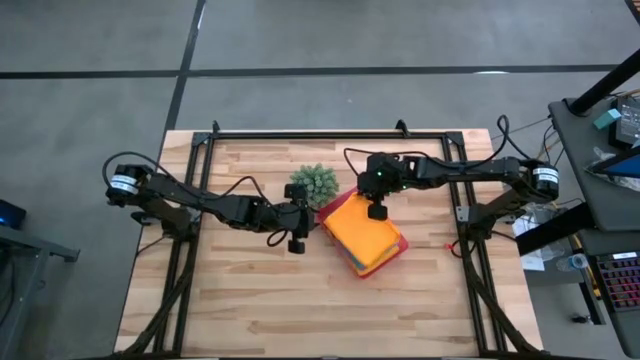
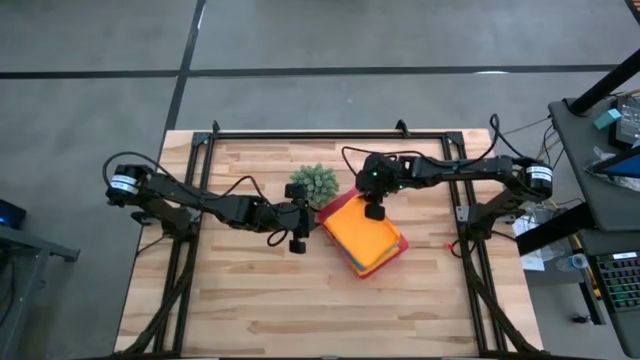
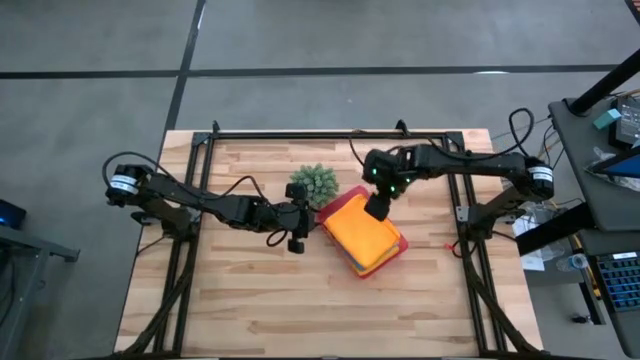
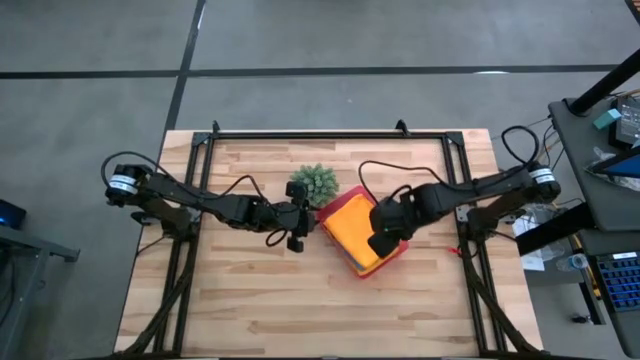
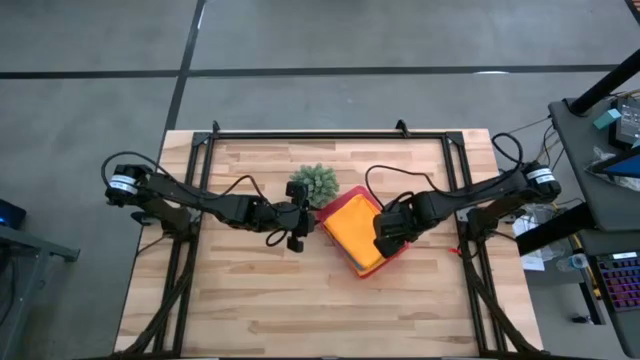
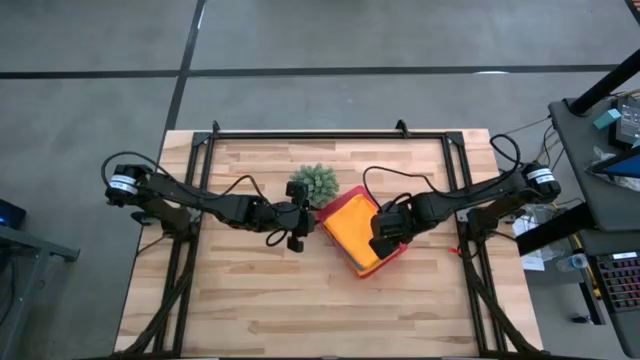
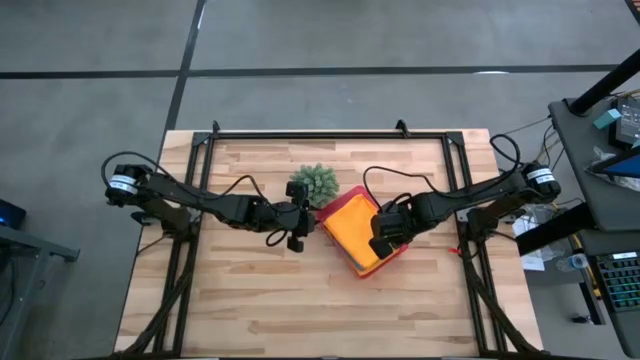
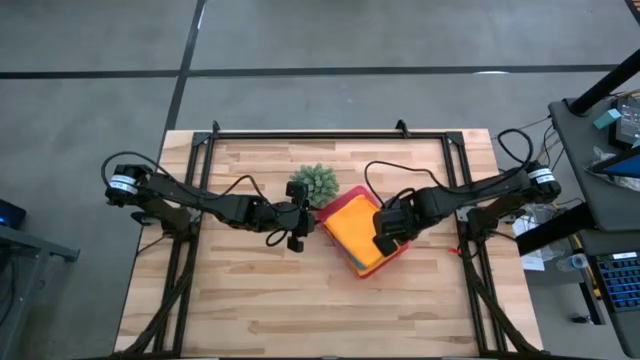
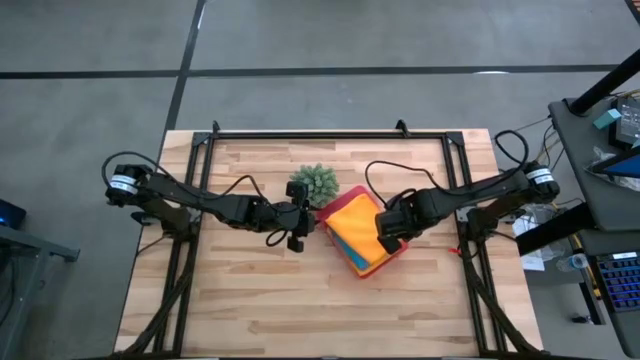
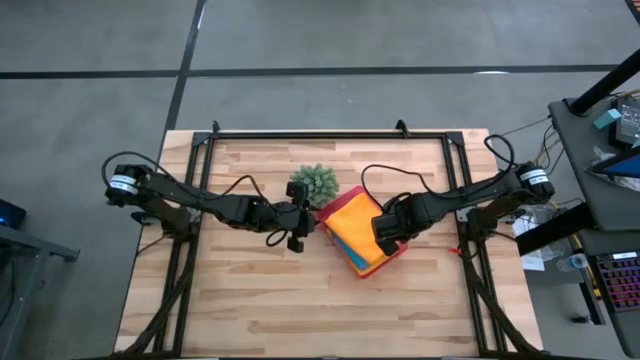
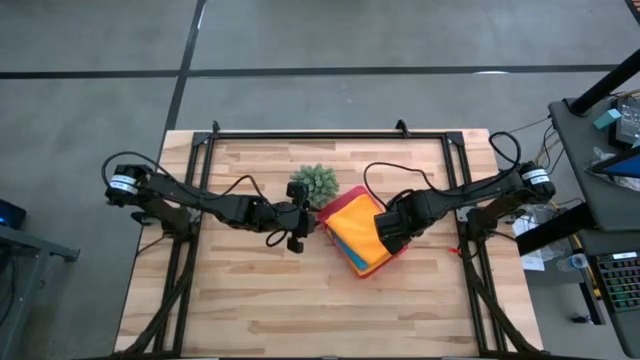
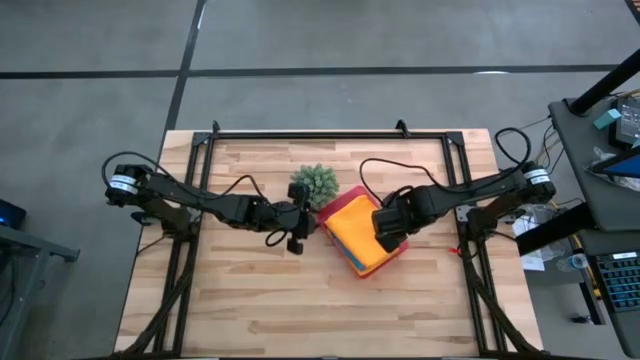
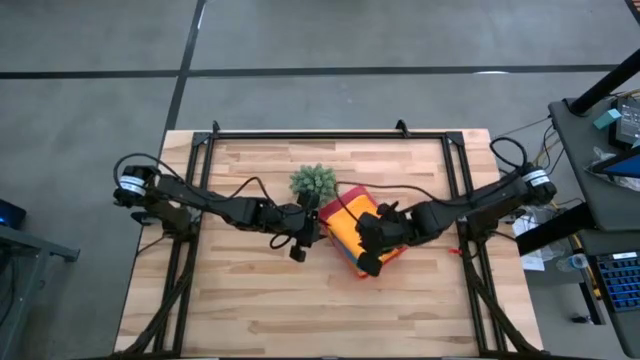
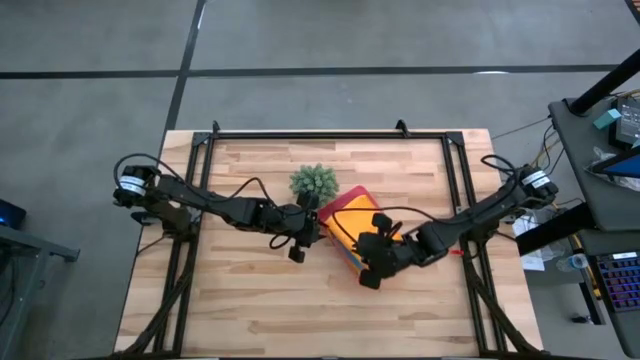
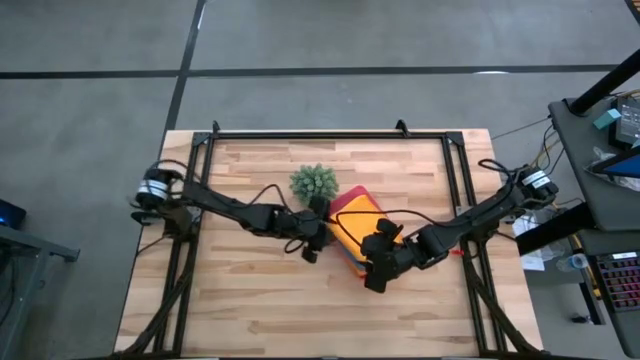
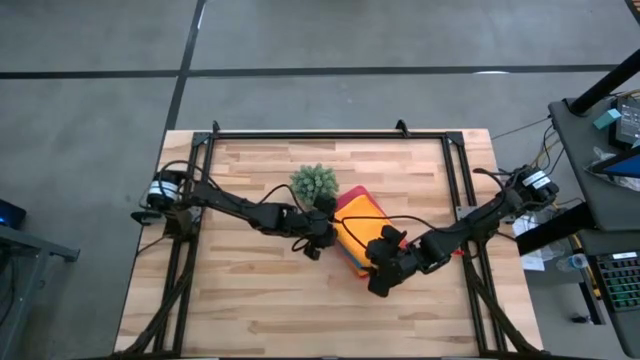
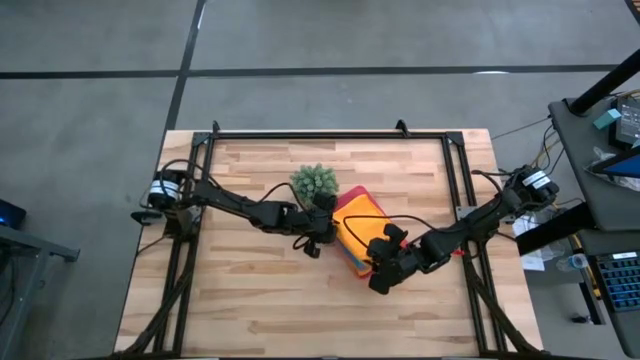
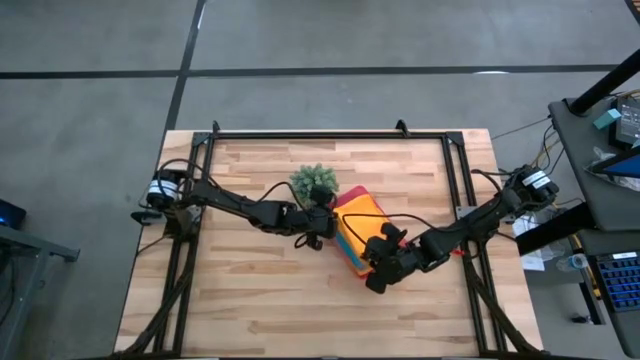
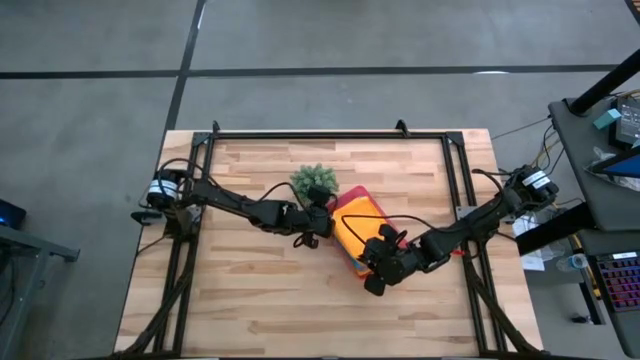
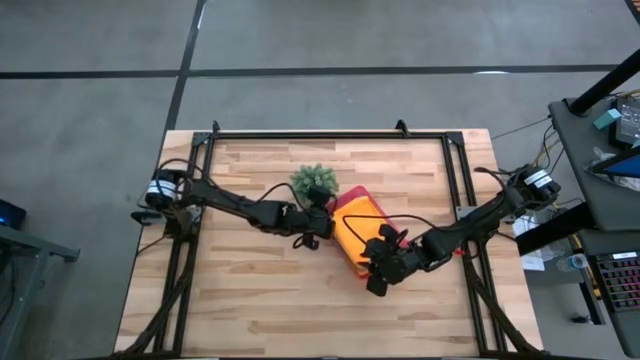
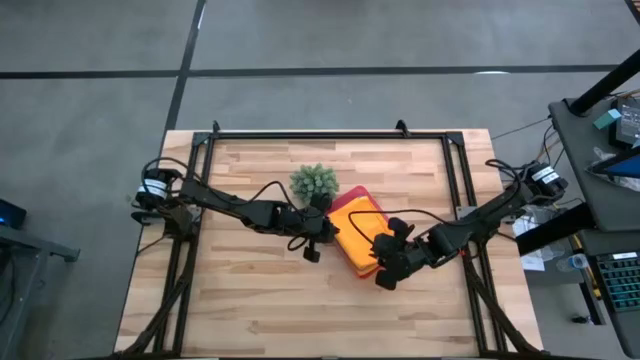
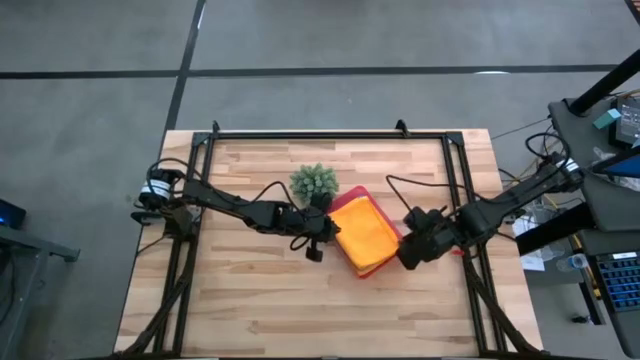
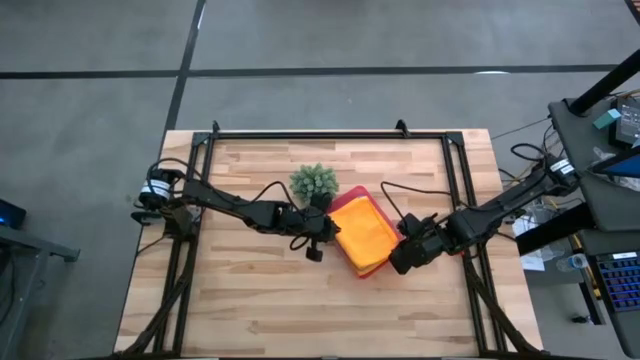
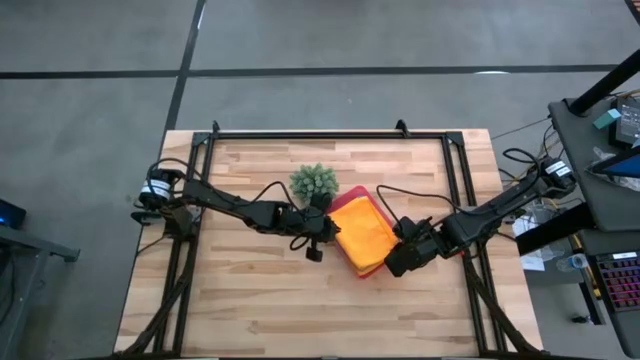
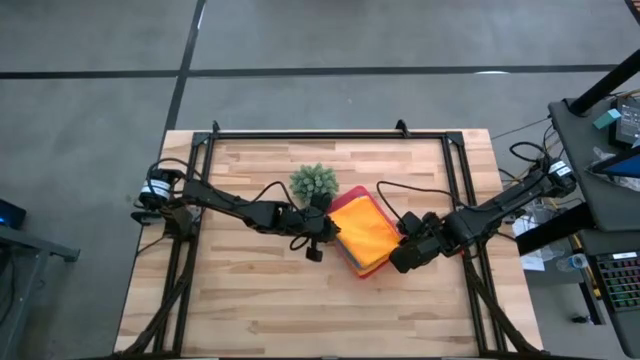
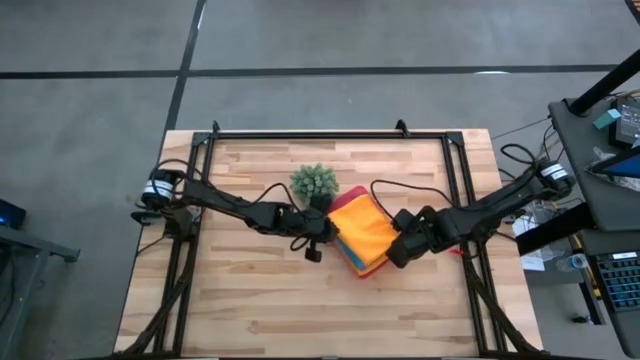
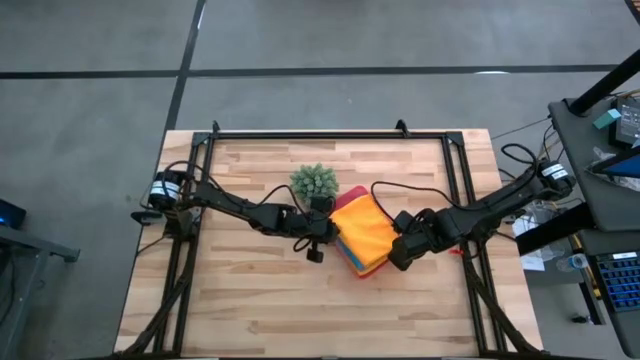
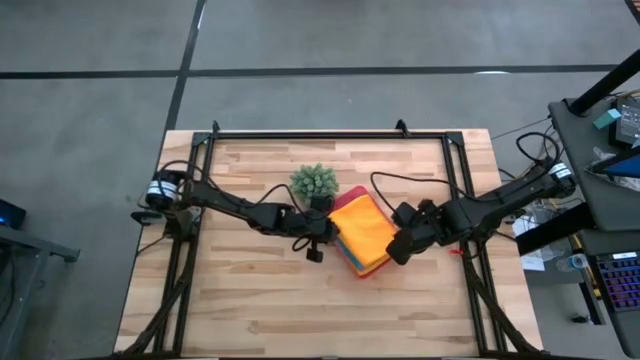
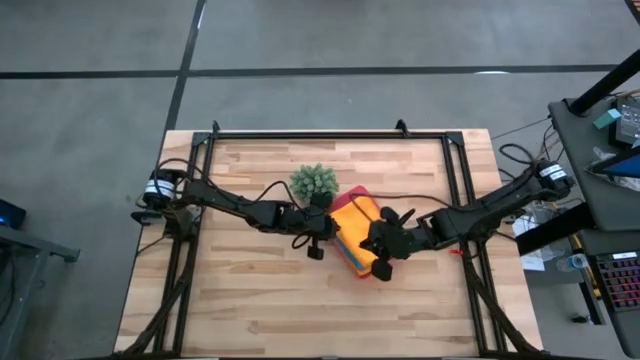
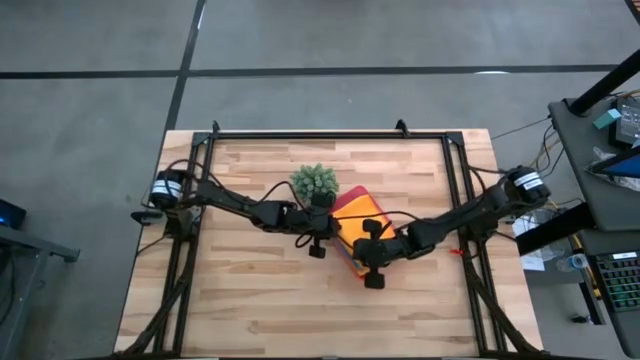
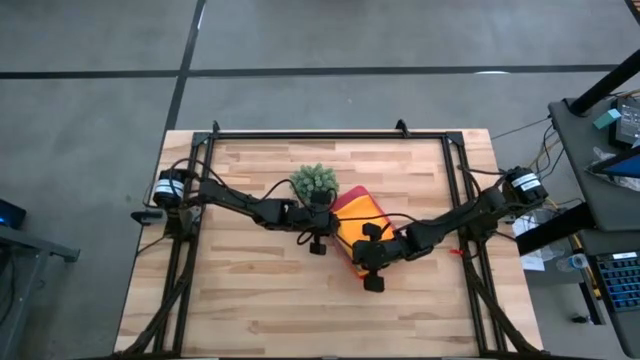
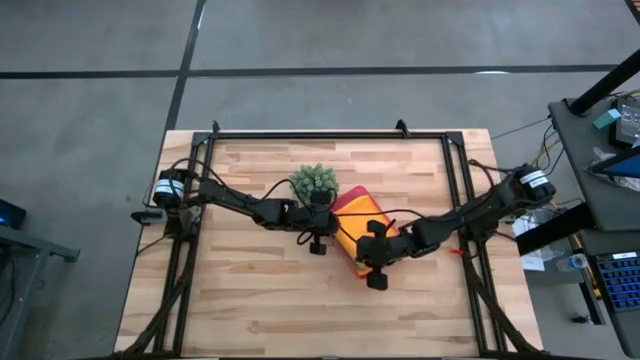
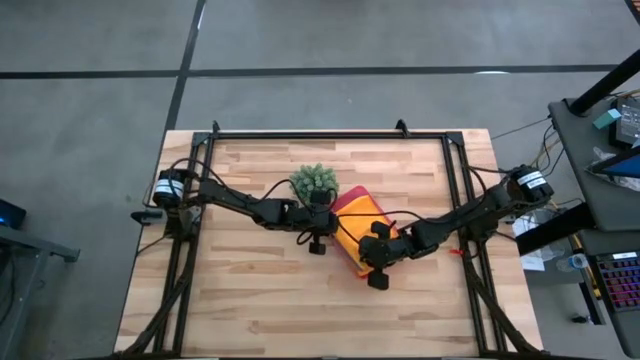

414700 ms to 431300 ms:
Task: Fold microfiber towels
Put the orange microfiber cloth into the pink bin

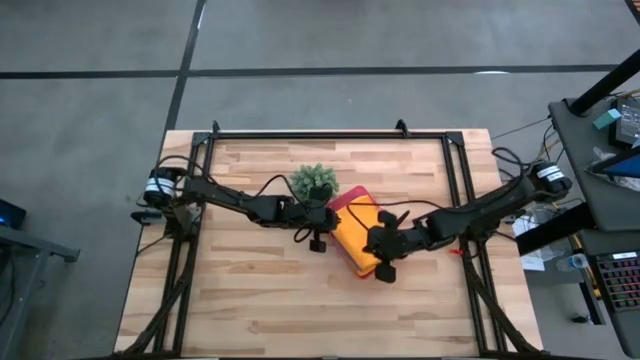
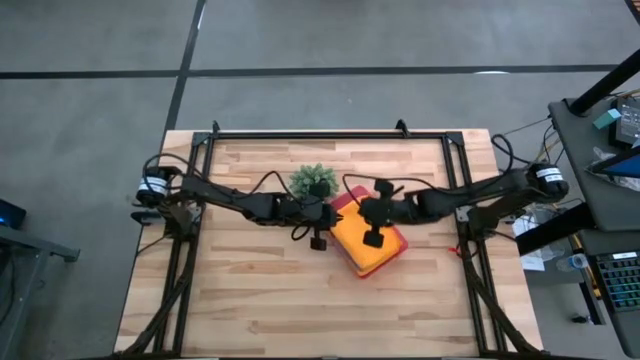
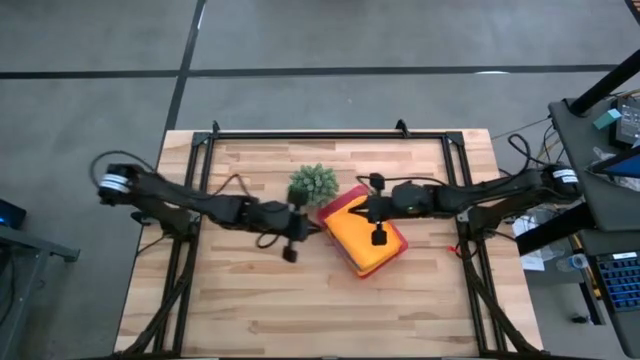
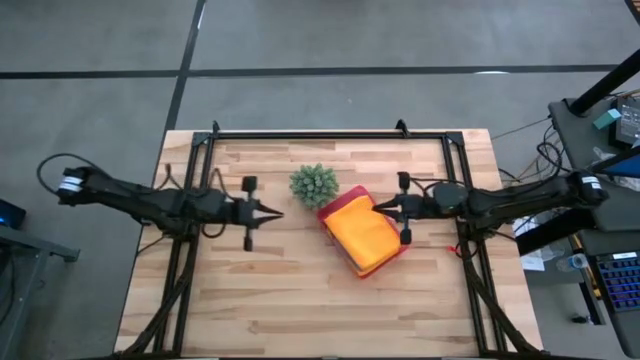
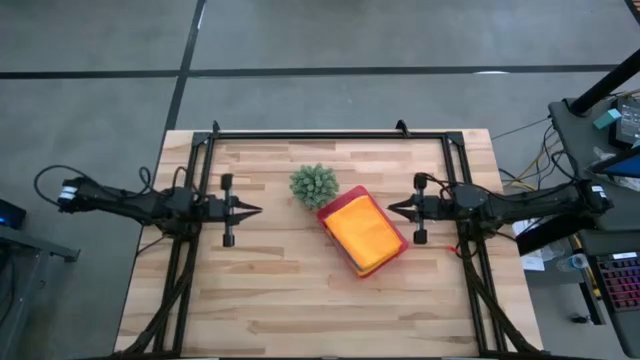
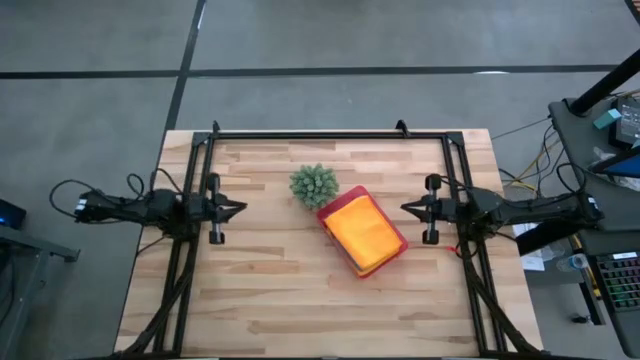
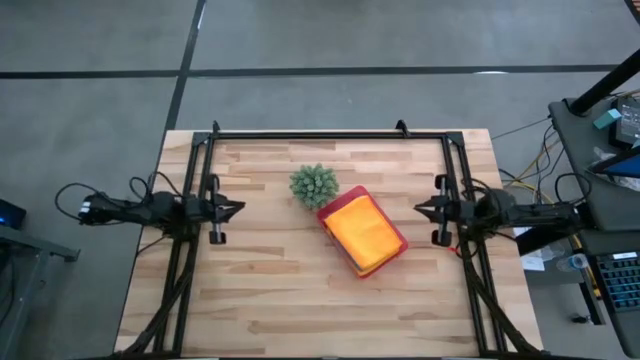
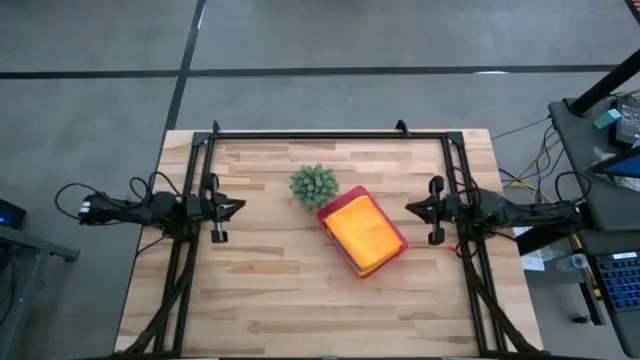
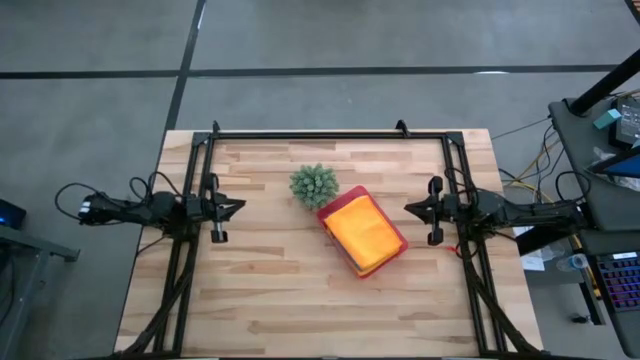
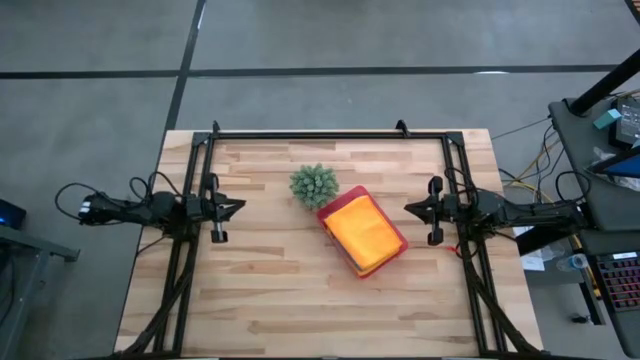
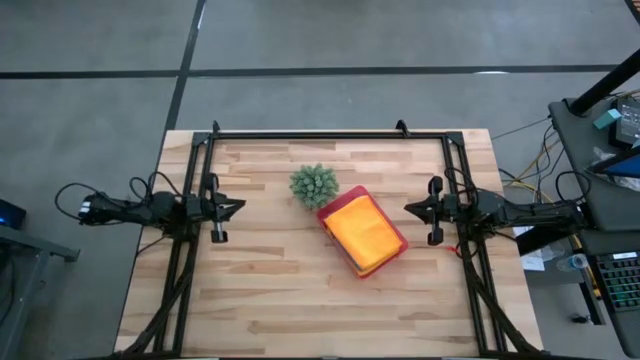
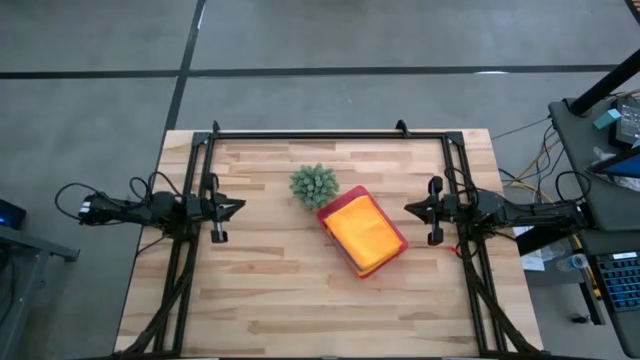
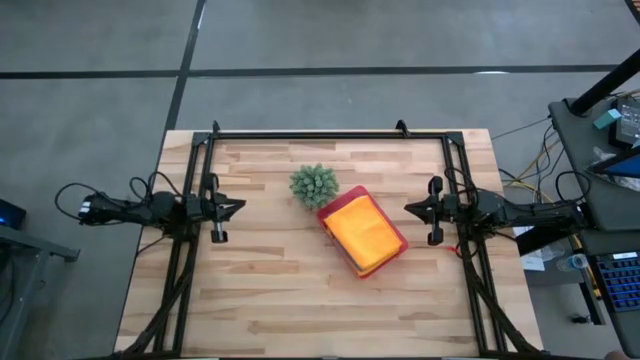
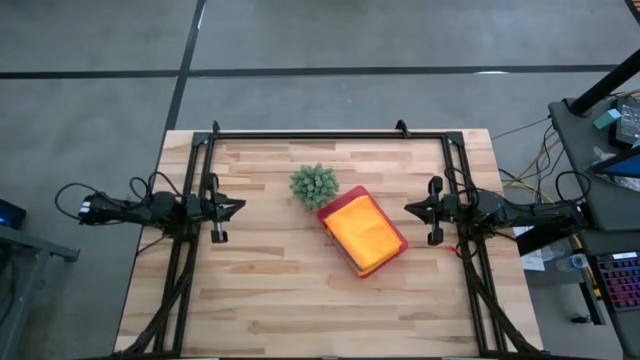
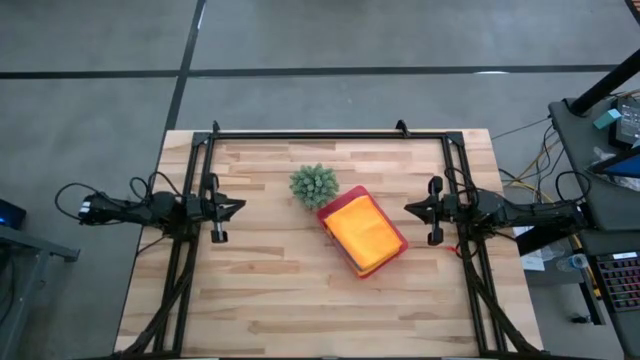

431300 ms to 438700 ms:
Return to Home Position
